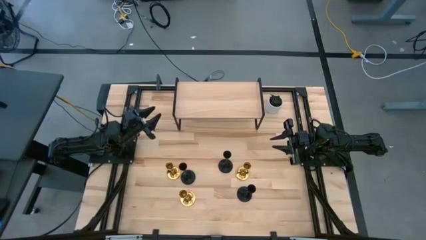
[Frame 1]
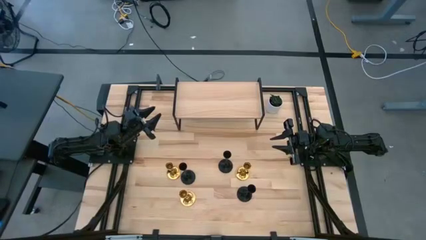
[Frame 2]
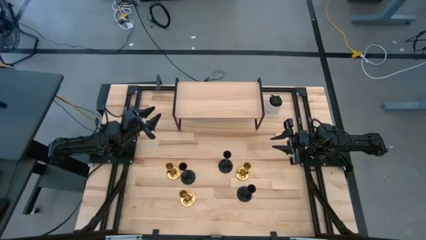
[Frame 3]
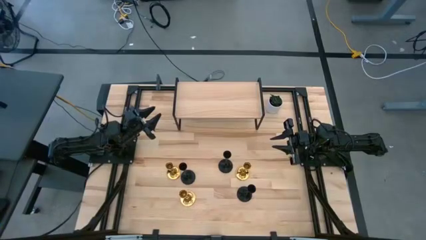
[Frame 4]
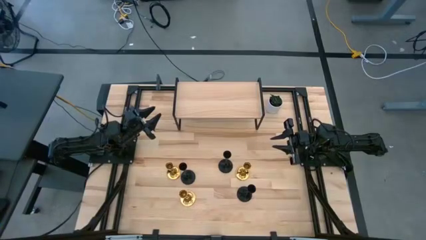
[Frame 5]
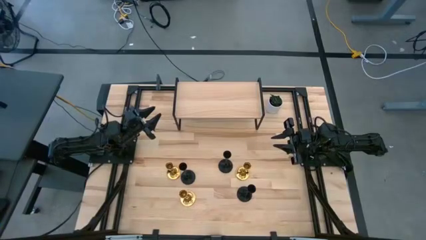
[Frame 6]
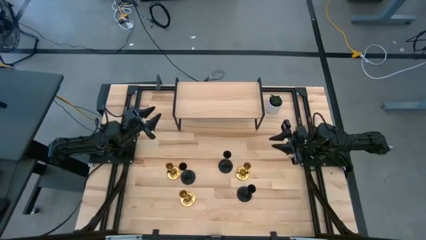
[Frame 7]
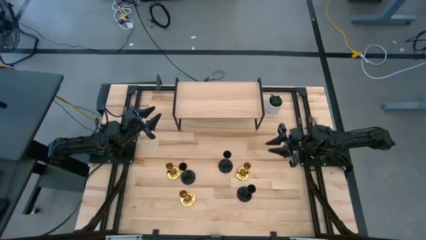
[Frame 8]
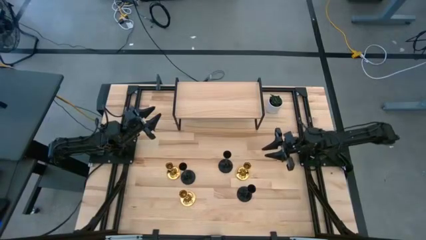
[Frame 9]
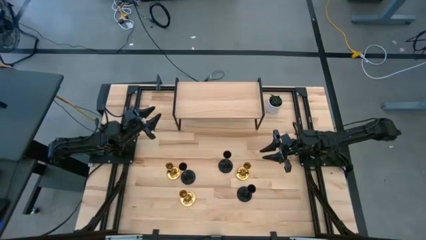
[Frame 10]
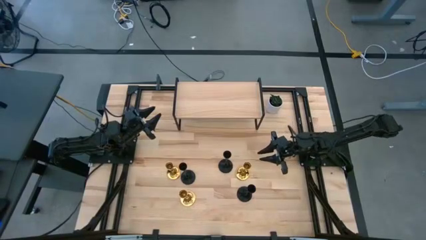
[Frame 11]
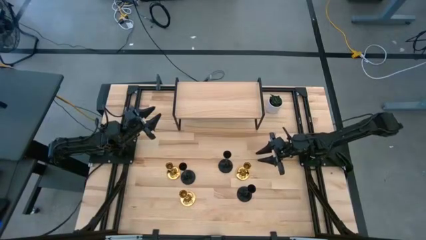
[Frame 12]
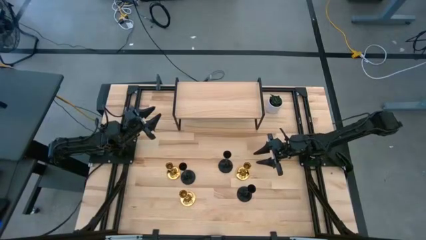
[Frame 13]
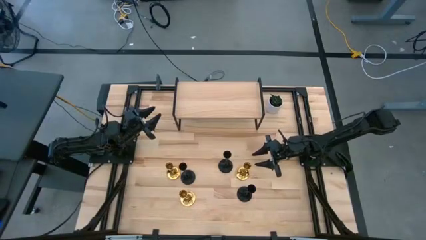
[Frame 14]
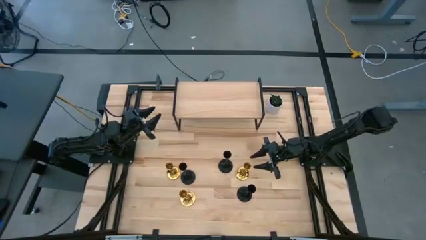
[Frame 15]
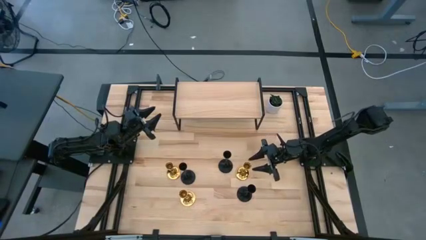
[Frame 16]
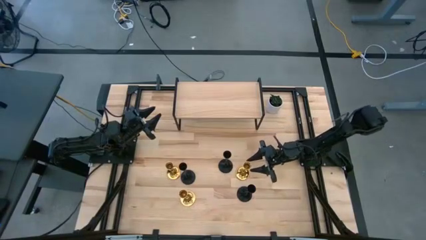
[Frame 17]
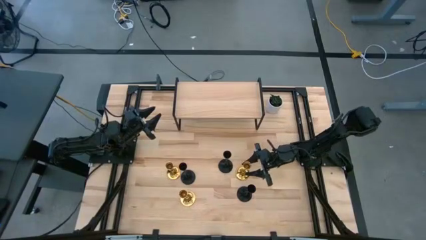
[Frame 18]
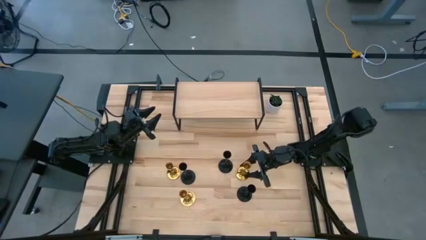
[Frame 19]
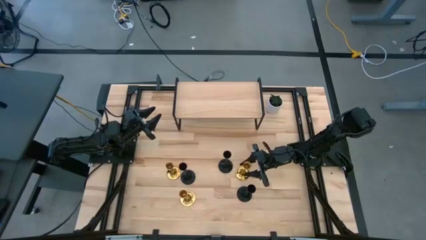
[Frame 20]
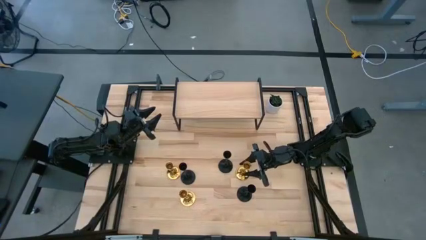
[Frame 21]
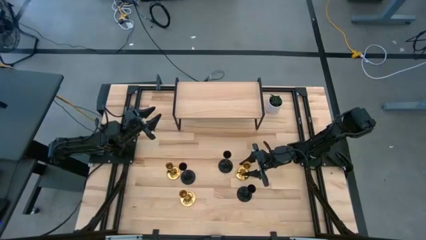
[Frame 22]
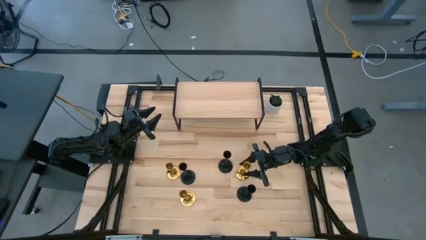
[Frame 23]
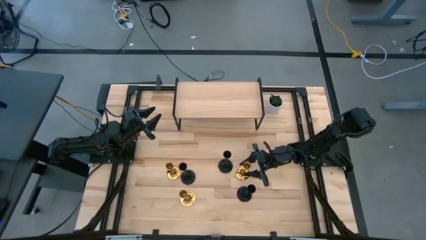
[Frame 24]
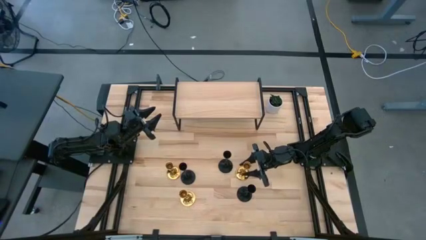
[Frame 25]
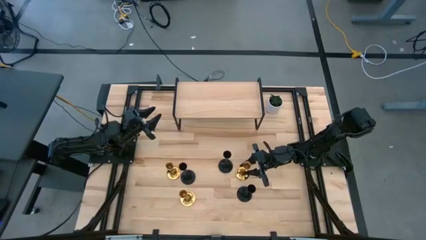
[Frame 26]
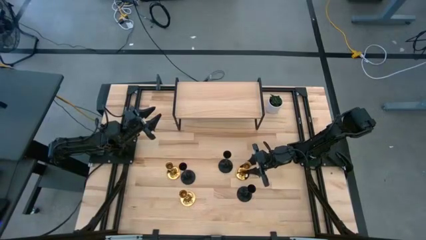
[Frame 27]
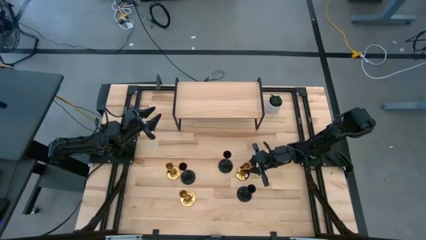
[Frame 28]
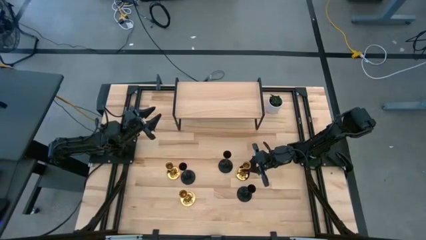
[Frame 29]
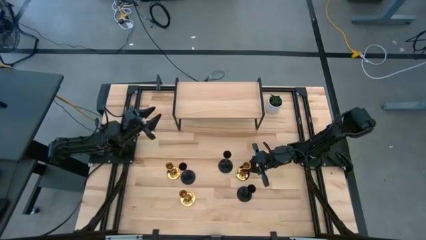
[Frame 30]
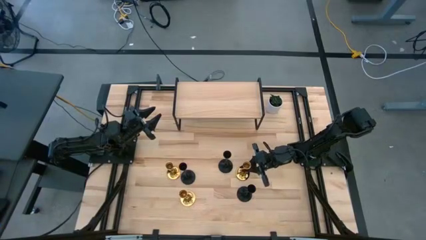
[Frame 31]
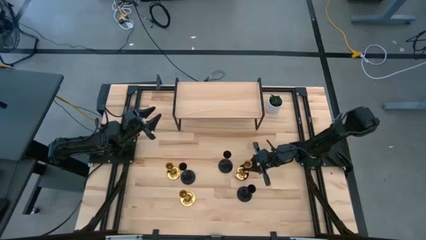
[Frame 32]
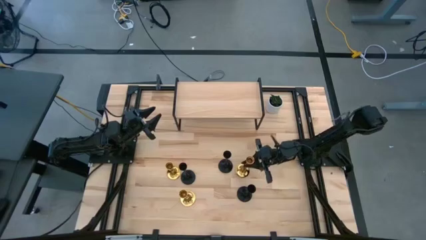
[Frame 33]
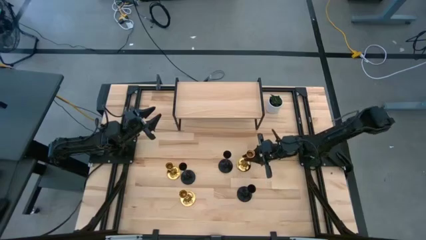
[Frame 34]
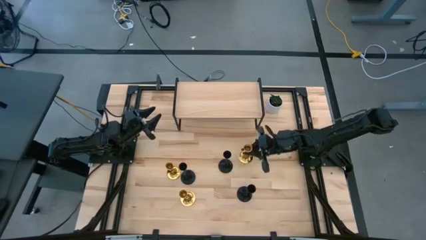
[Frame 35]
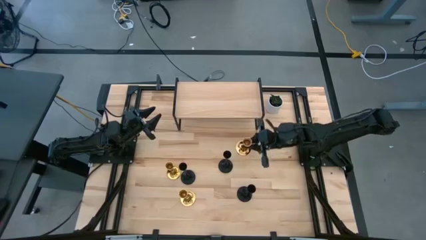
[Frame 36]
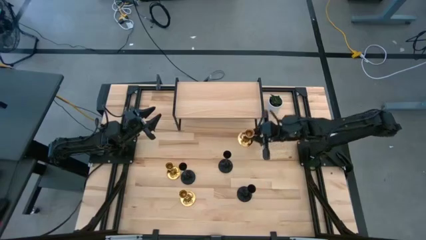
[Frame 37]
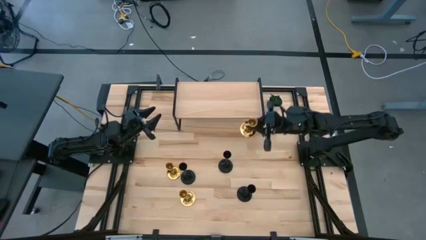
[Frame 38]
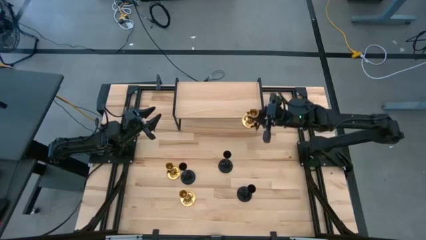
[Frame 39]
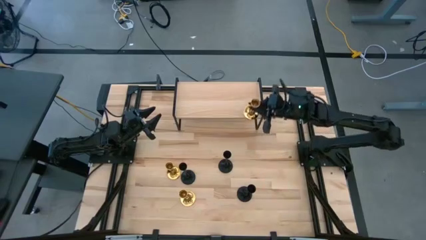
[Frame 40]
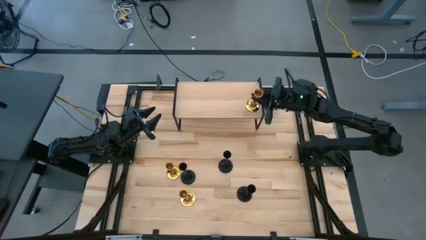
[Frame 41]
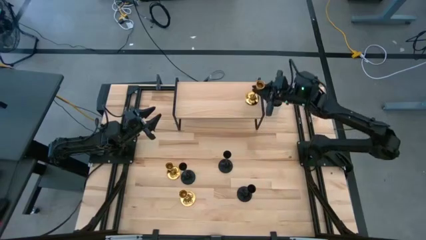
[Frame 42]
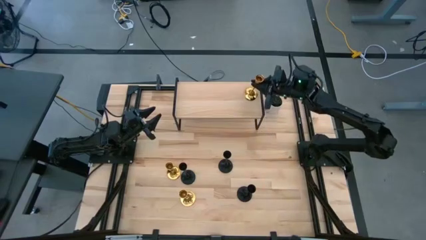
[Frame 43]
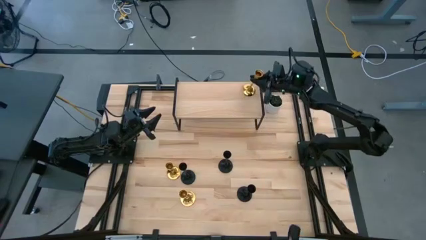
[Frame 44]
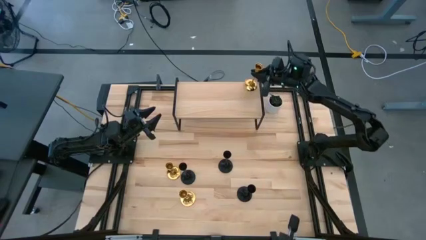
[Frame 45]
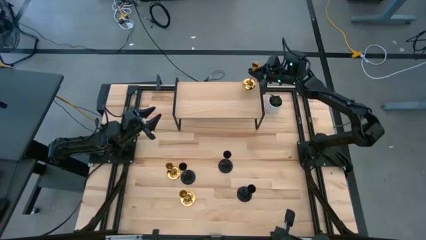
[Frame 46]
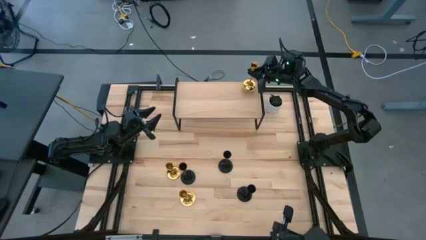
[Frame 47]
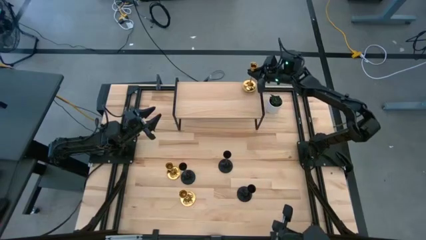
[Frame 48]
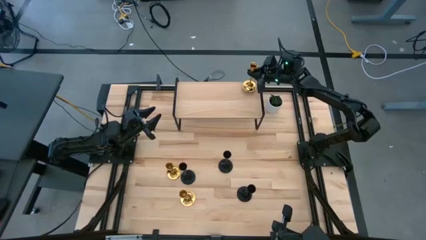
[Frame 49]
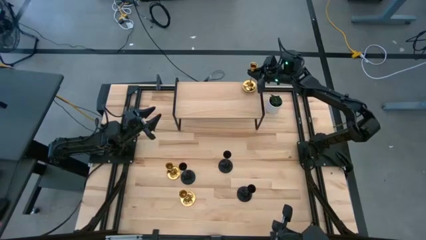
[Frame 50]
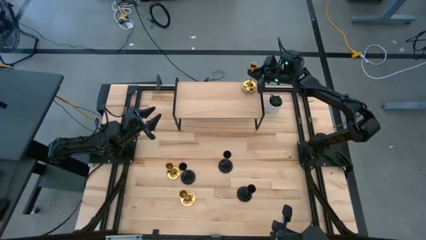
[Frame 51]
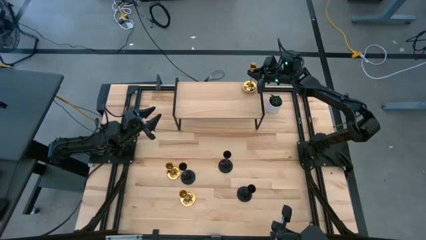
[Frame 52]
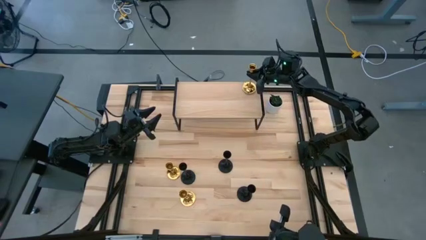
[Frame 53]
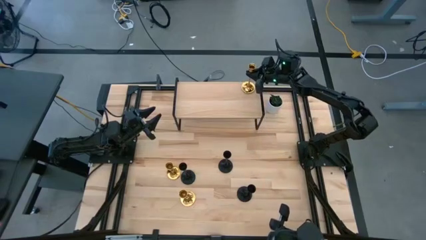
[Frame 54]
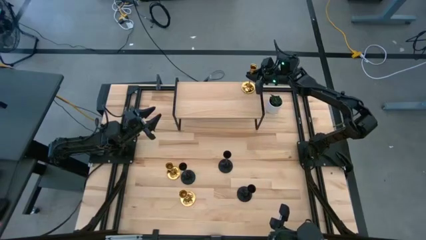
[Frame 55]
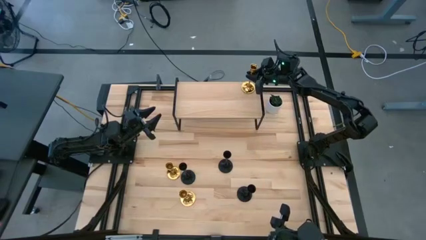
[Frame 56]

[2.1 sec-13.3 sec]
Task: Pick & Place candle stick holders
Put the top right gold candle holder on the shelf

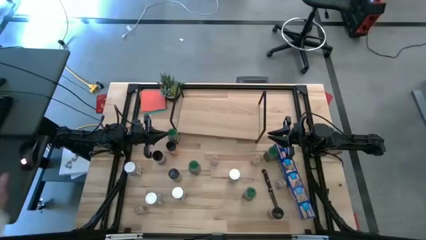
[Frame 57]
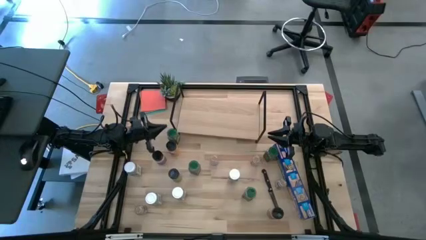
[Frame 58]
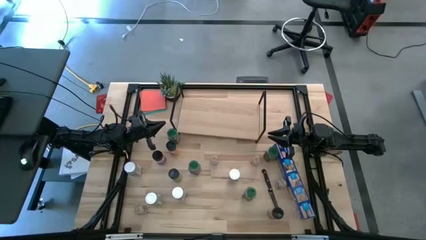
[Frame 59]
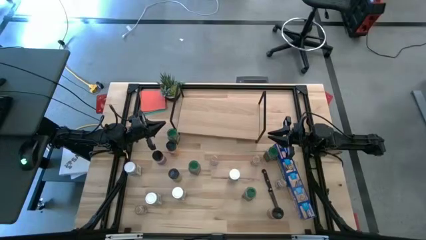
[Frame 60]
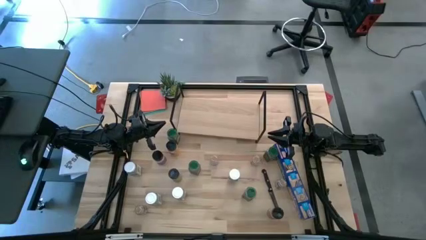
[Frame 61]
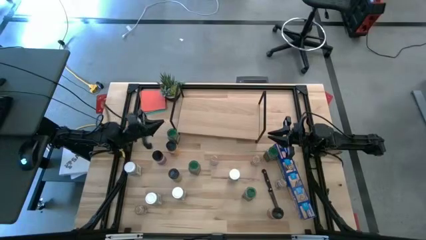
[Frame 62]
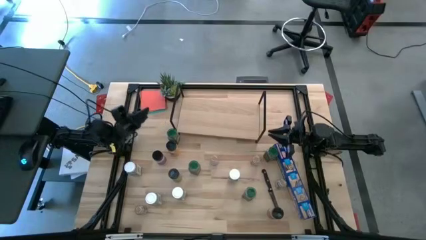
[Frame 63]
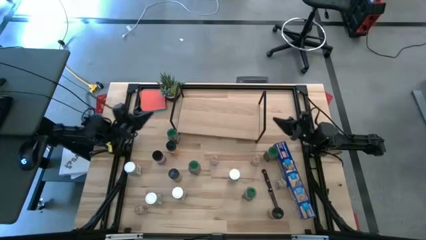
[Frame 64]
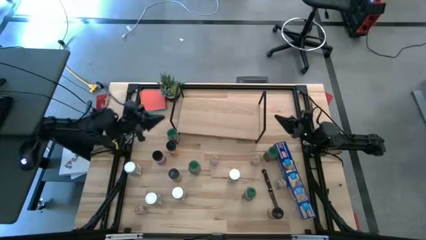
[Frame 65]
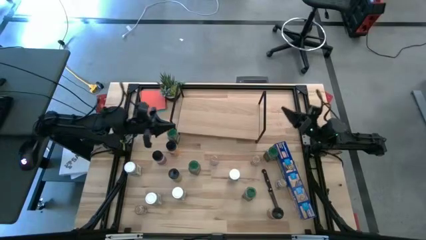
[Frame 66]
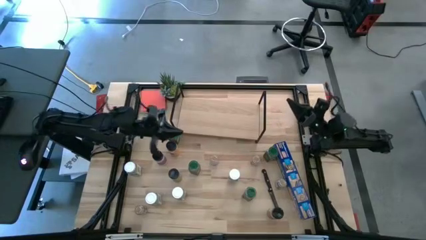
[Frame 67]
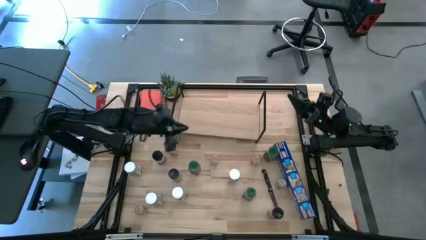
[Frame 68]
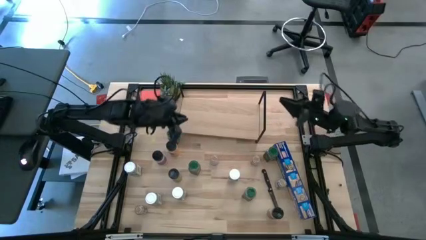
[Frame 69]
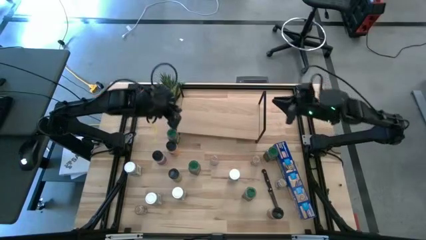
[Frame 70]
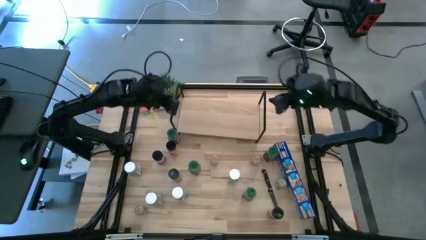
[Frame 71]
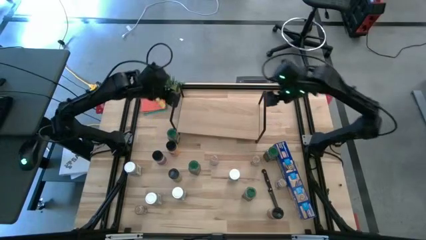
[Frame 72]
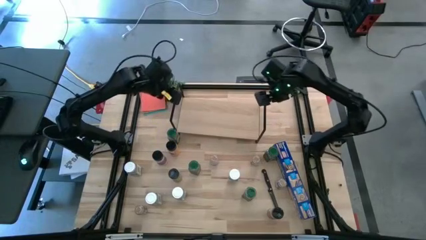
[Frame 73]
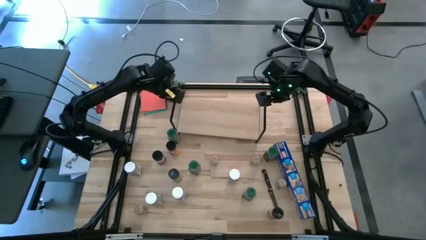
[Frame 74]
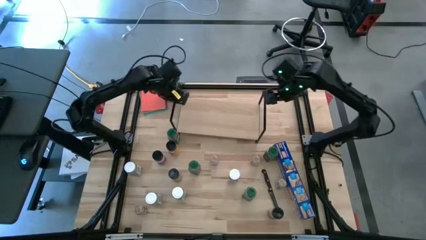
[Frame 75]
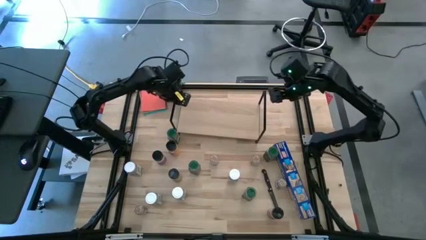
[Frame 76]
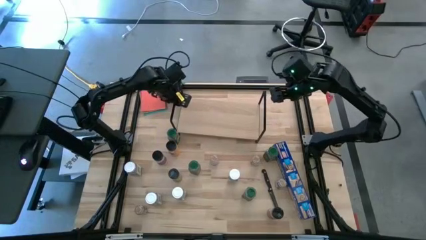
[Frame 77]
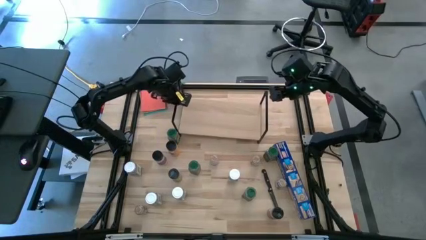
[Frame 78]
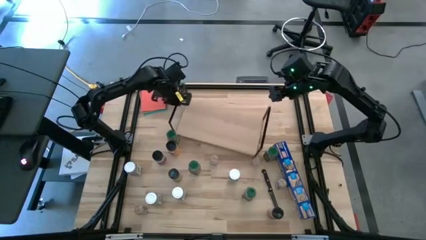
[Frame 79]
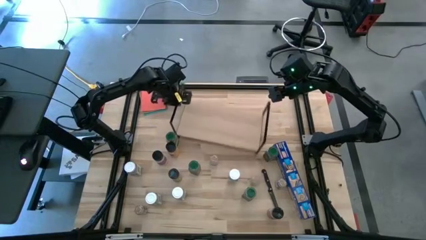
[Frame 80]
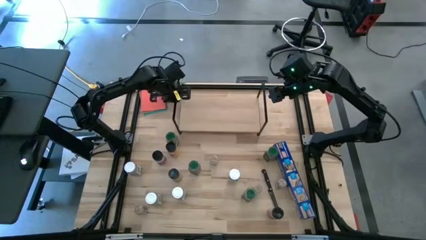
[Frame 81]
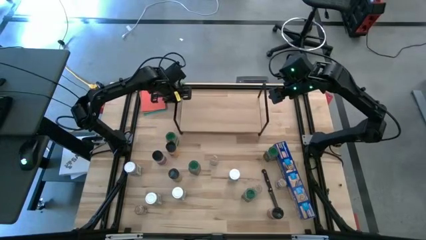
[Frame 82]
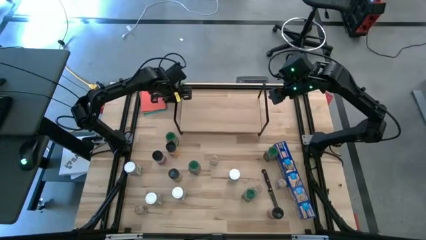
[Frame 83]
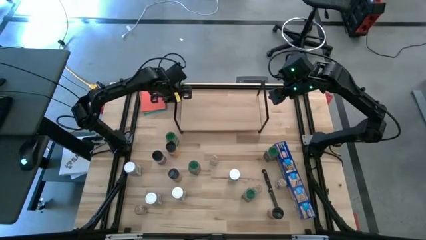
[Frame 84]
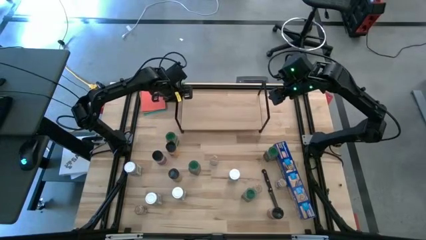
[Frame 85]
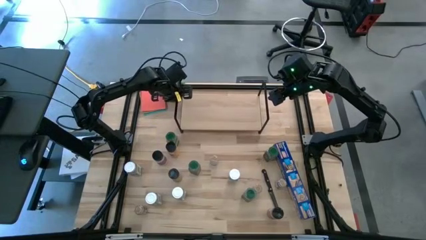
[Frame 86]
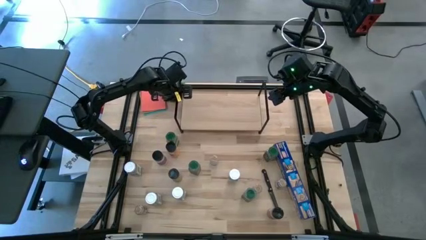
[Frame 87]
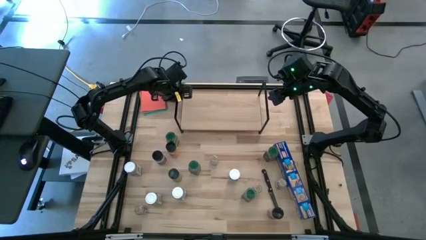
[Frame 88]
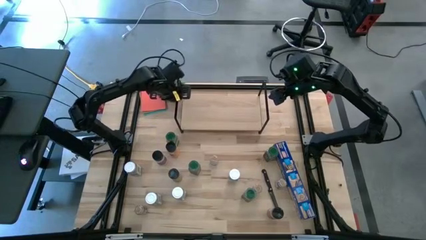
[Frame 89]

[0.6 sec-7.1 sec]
Task: Shelf spices
Move the shelf to the top center of the table
